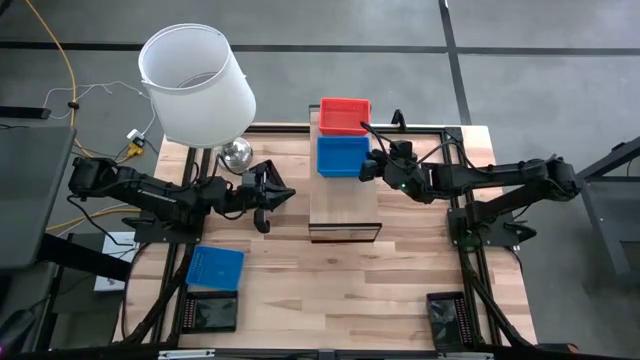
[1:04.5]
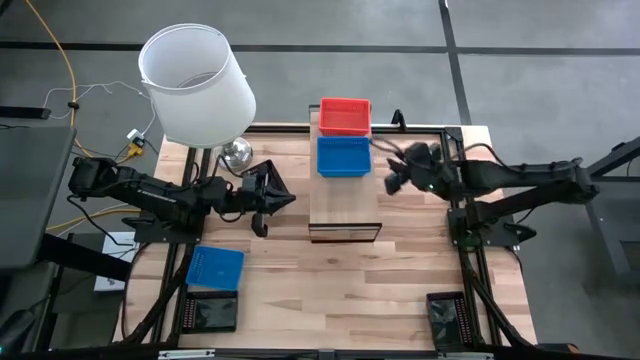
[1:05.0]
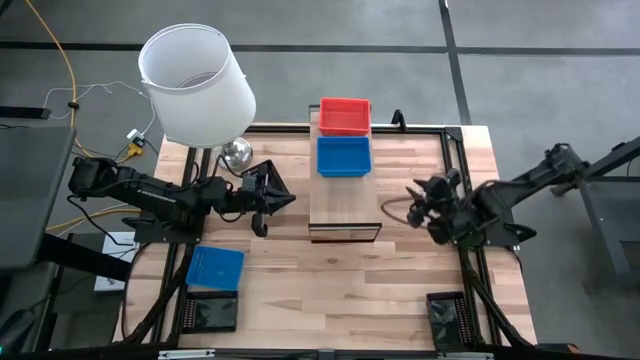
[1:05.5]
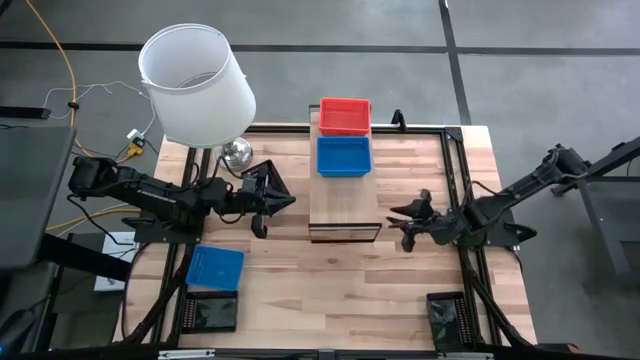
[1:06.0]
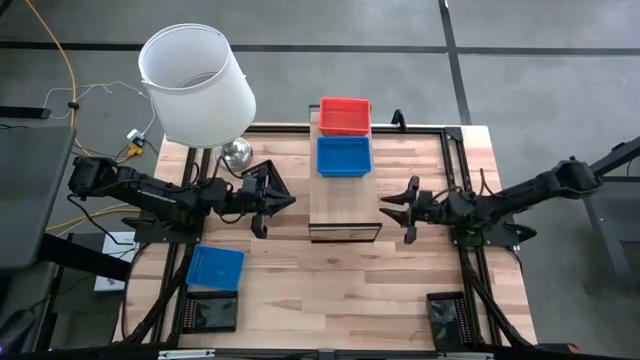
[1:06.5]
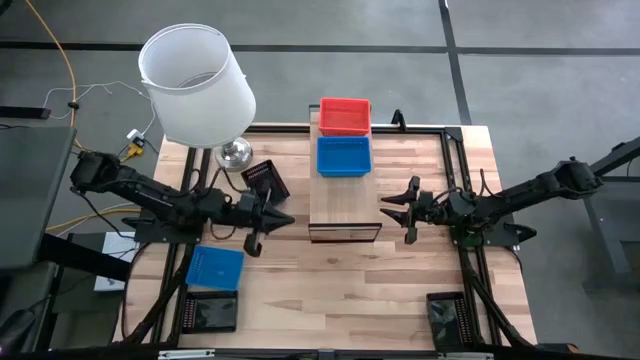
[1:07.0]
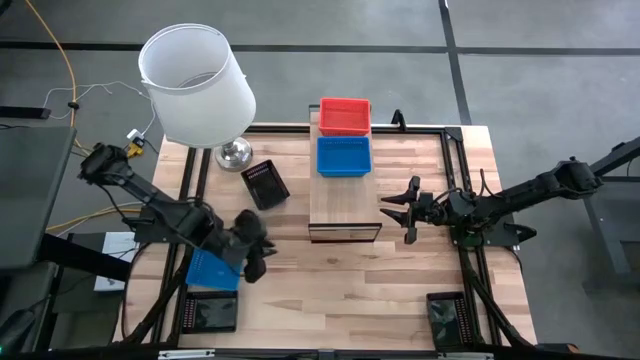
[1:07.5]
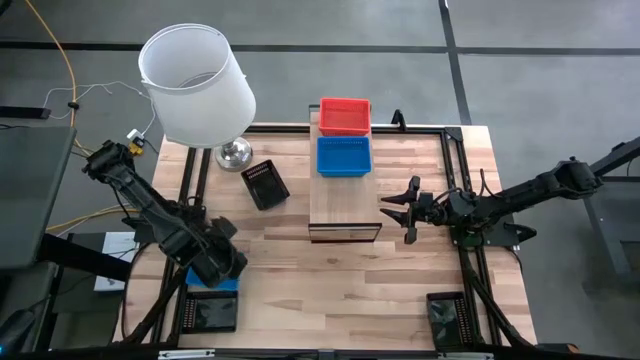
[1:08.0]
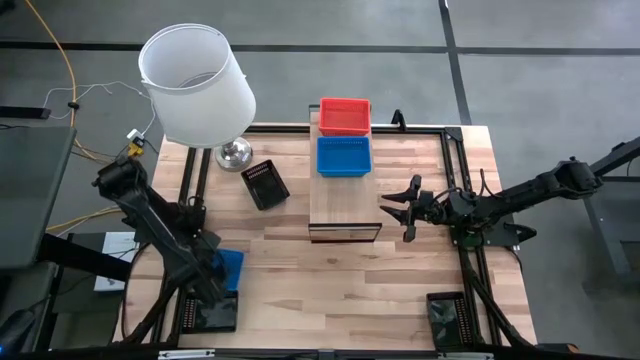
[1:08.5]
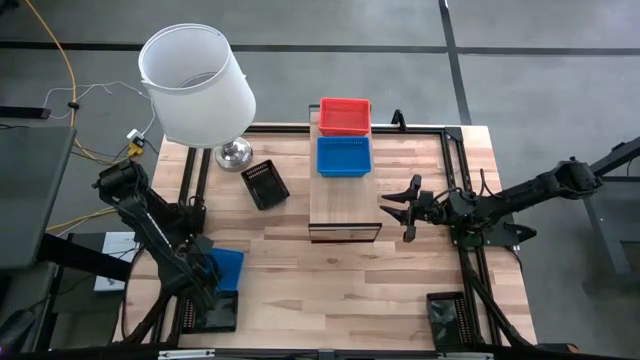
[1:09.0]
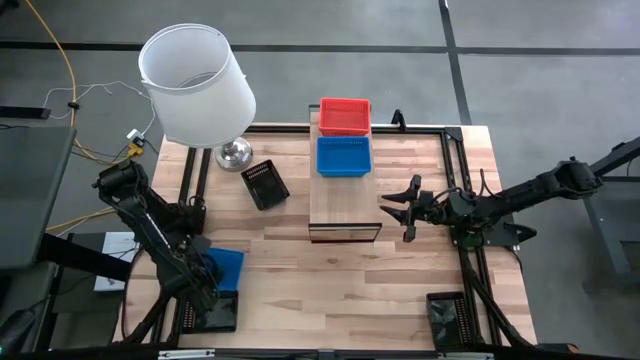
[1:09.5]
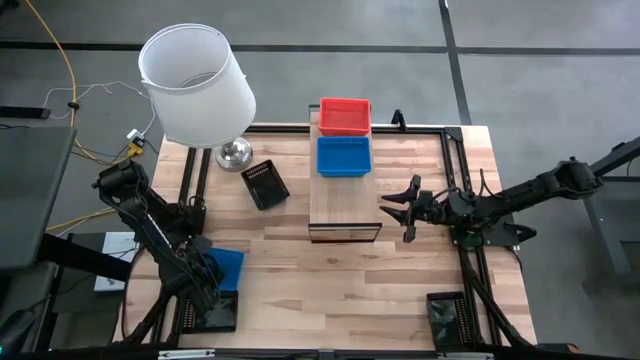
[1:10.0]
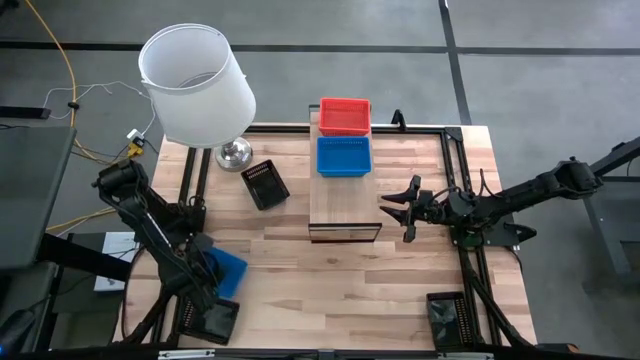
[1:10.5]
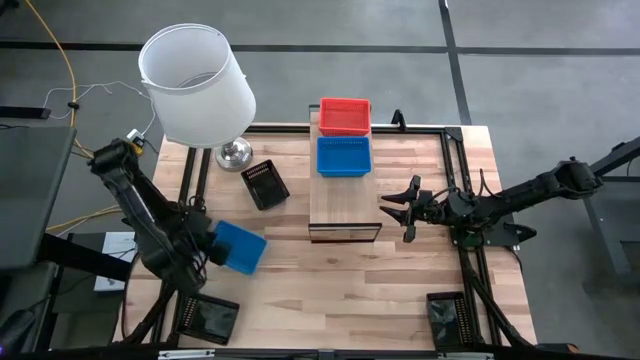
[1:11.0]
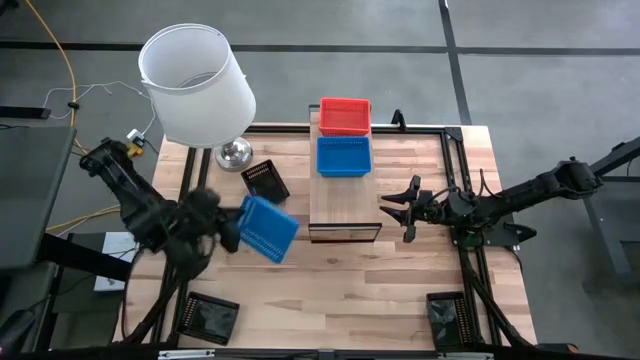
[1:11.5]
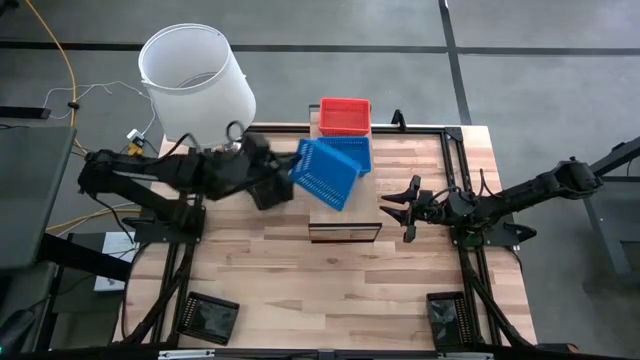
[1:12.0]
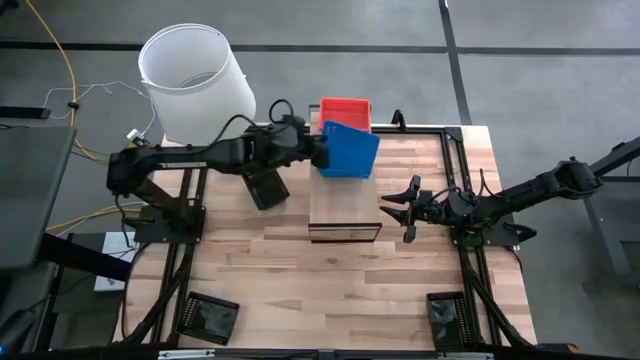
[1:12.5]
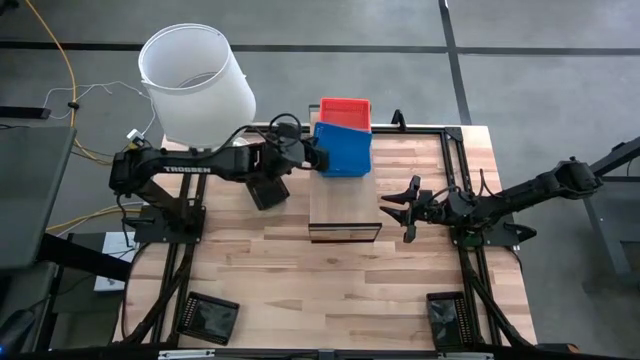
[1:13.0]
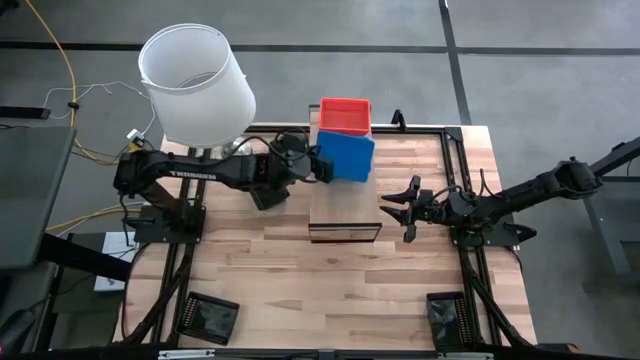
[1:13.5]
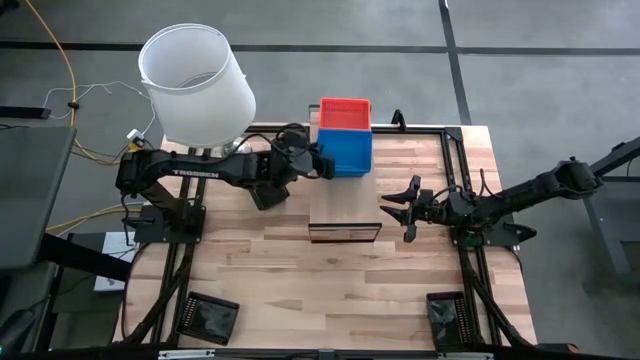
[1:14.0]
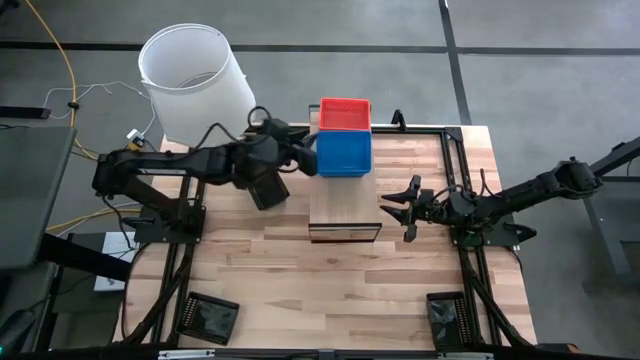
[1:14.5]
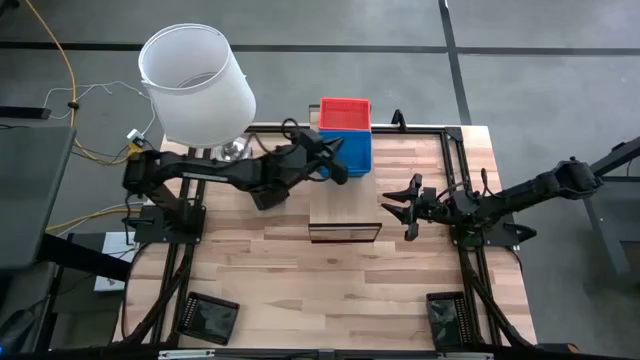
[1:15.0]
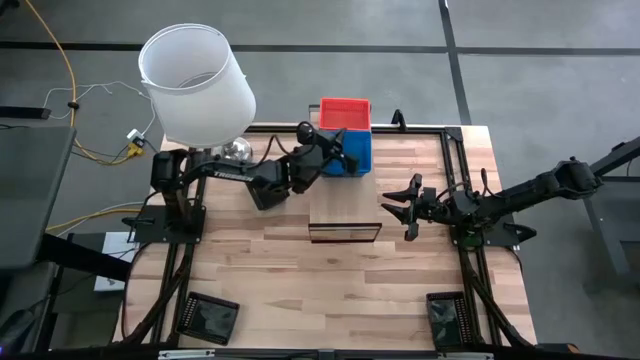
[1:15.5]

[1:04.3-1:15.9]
Task: Stack baskets on shelf by color
Stack the blue bin on top of the blue bin on the shelf

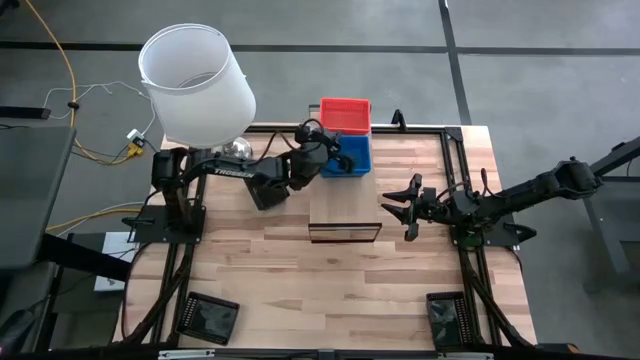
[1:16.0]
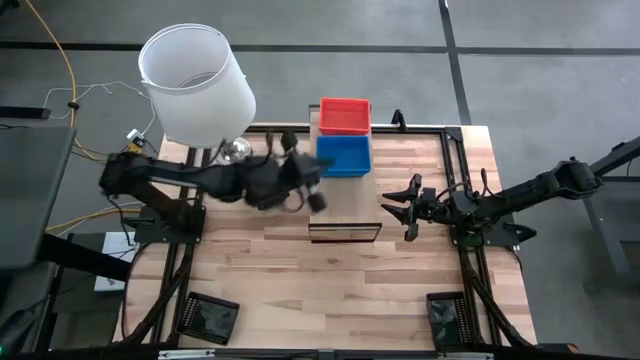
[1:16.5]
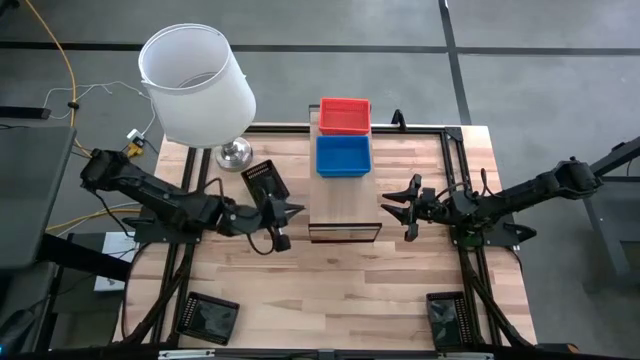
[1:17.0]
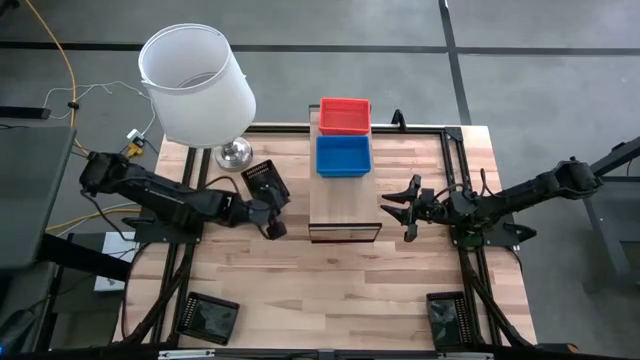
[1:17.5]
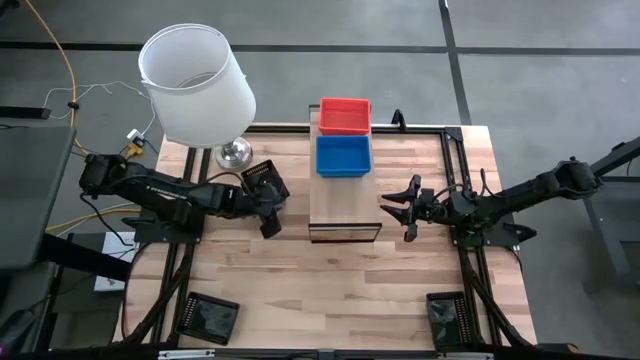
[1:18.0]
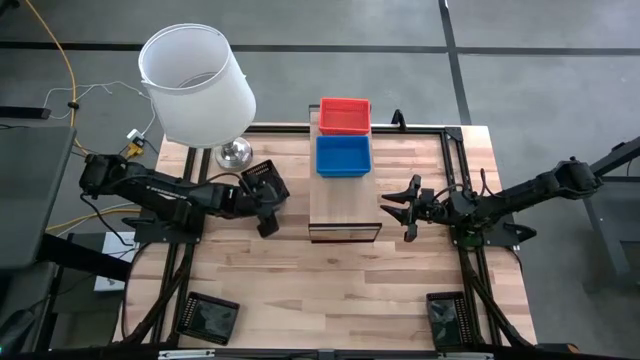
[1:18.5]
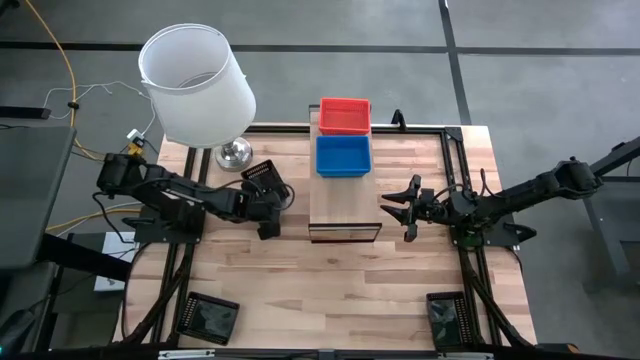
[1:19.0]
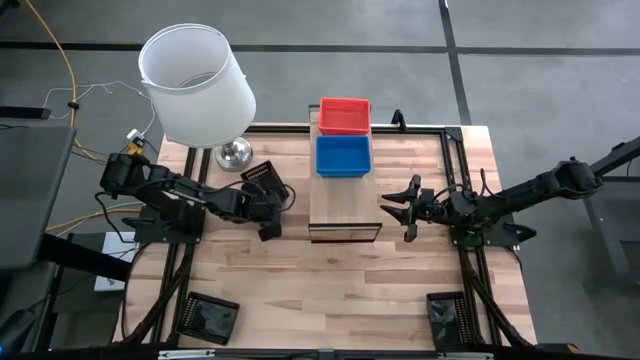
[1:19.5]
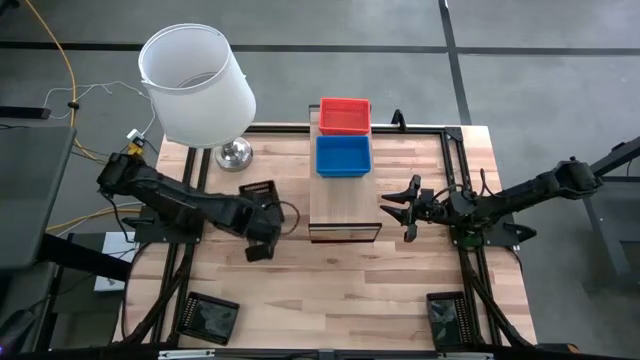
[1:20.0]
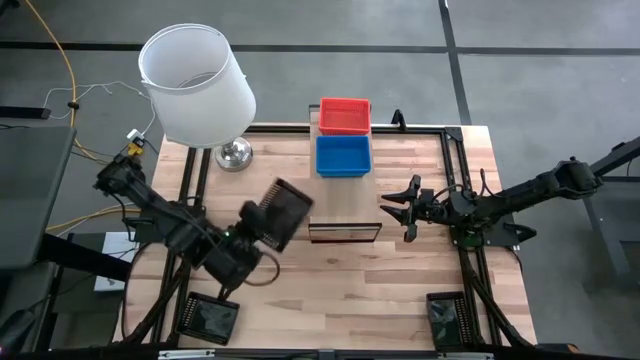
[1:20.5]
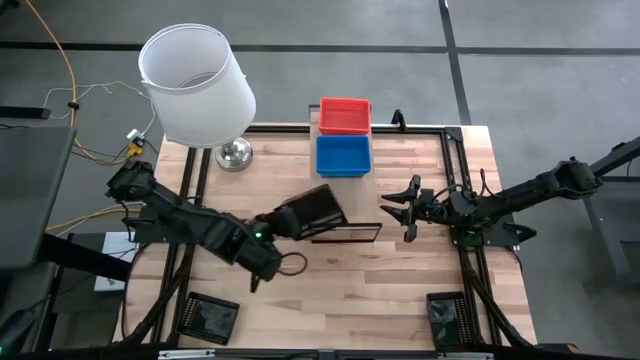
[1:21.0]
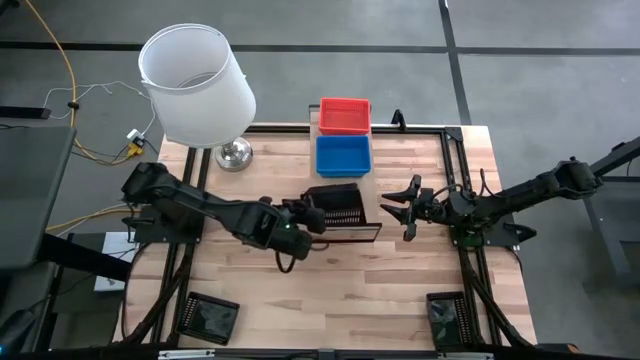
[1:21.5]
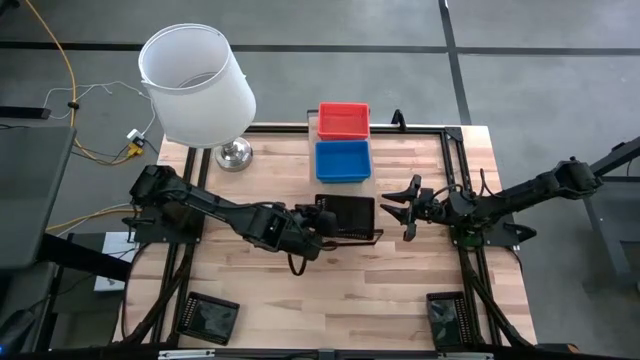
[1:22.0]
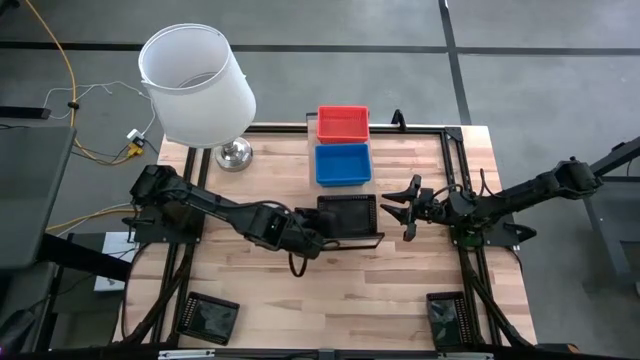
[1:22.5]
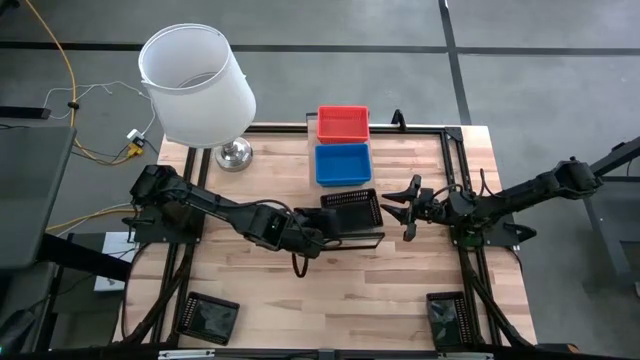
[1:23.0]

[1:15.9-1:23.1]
Put the top black bin on the shelf

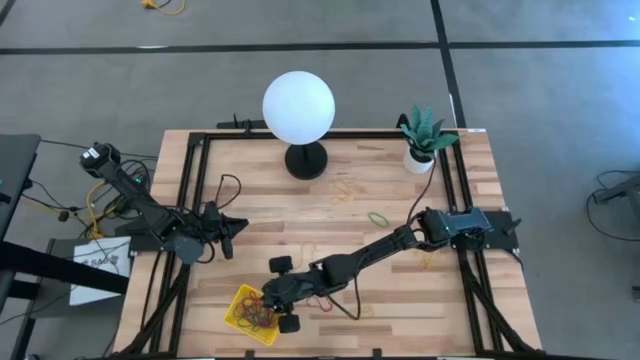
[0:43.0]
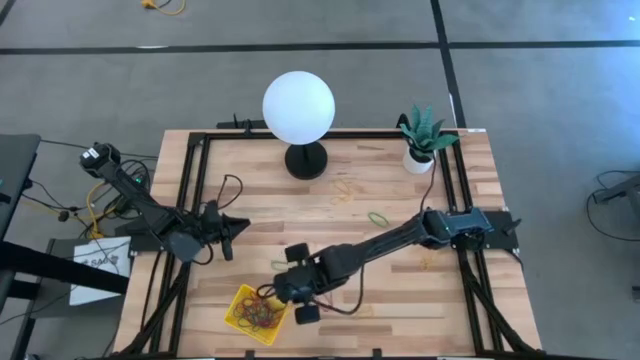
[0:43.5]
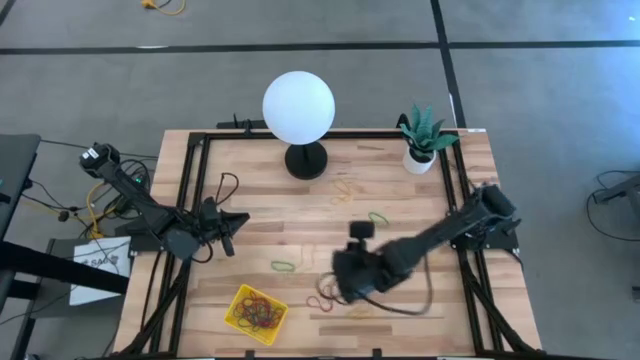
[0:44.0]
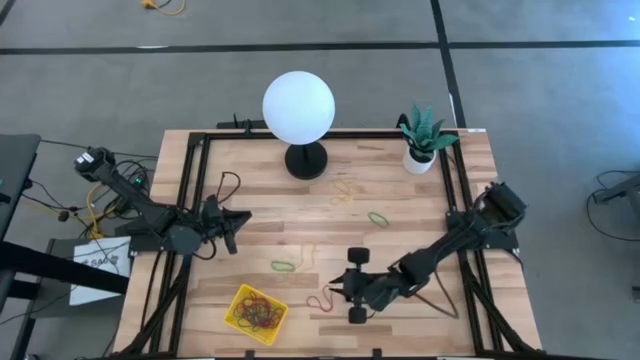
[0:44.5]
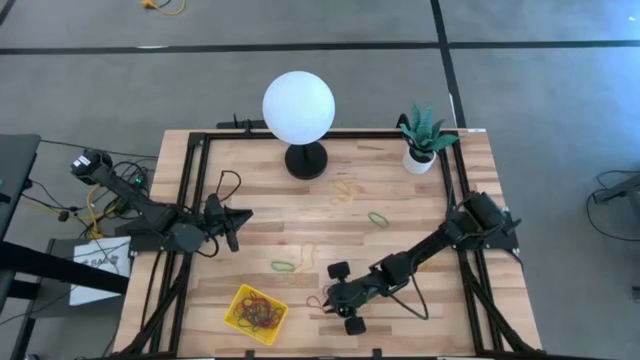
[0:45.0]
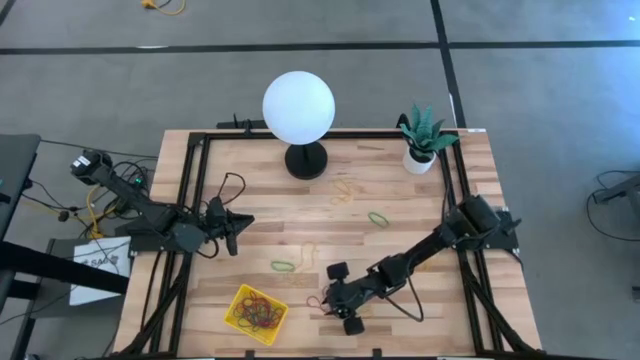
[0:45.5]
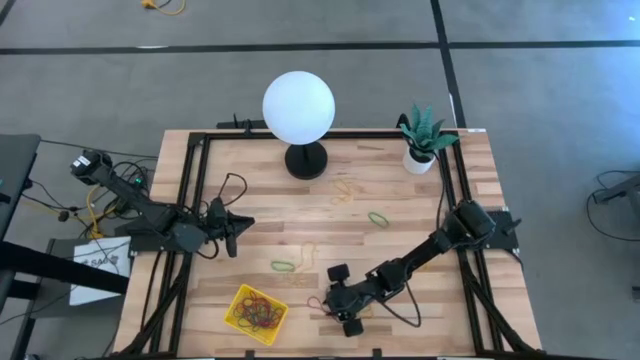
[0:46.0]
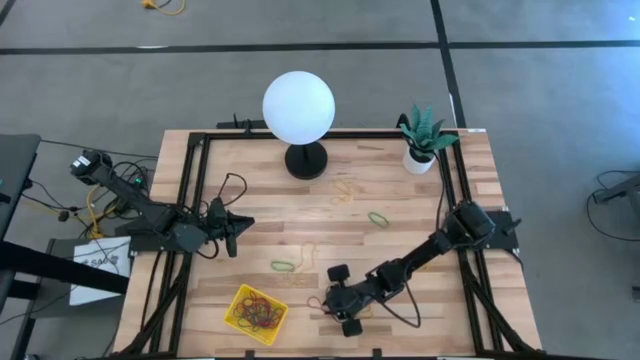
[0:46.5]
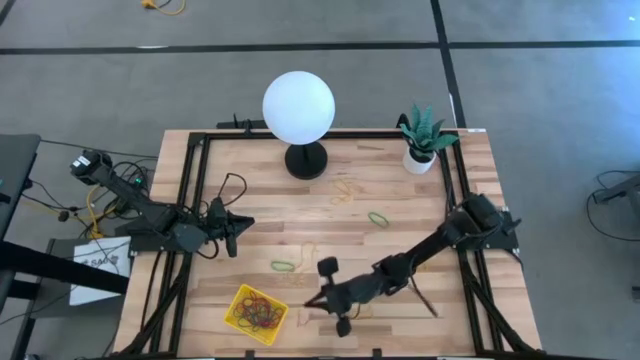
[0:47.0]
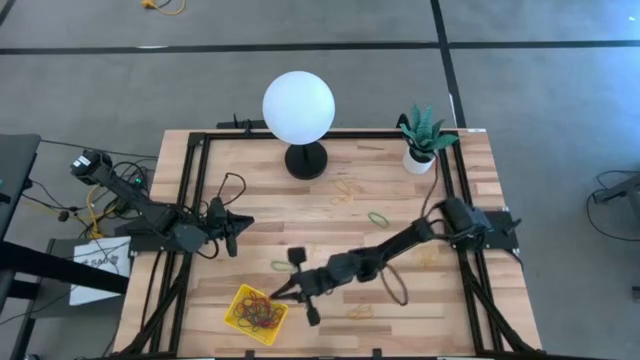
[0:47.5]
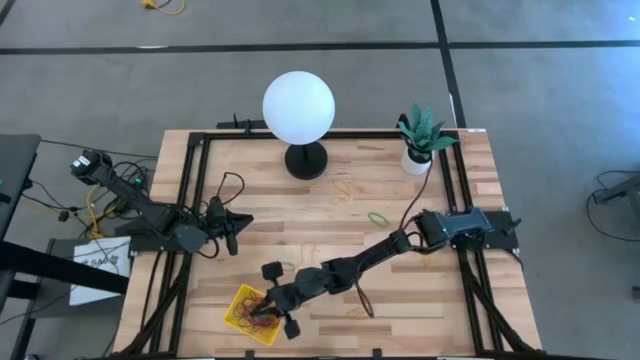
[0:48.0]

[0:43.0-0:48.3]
Task: Pick and place items into bin
Put the red rubber band into the yellow bin
